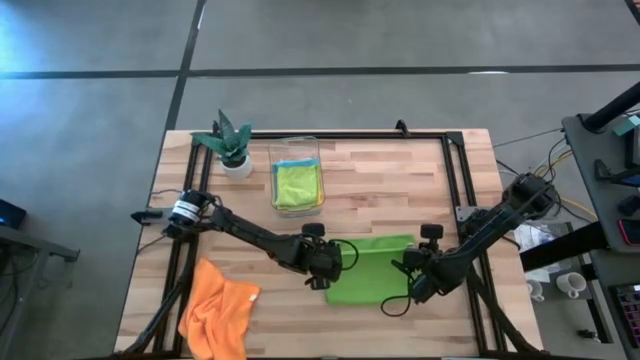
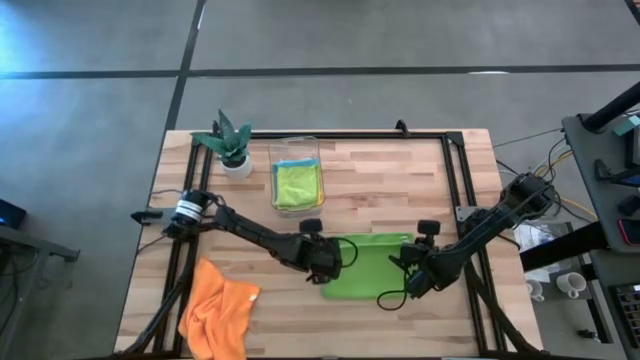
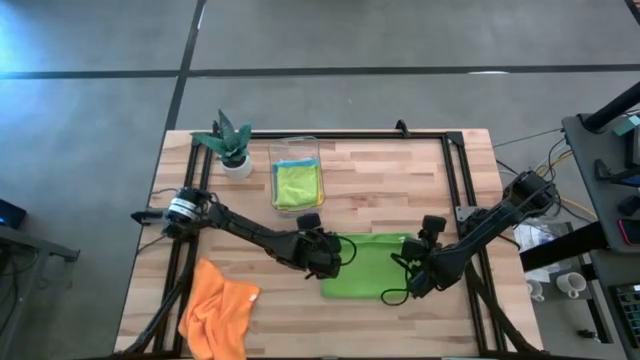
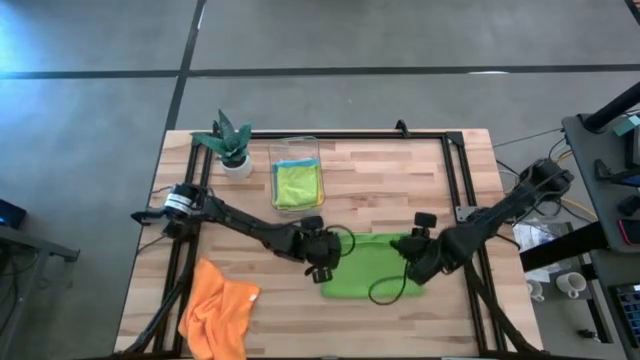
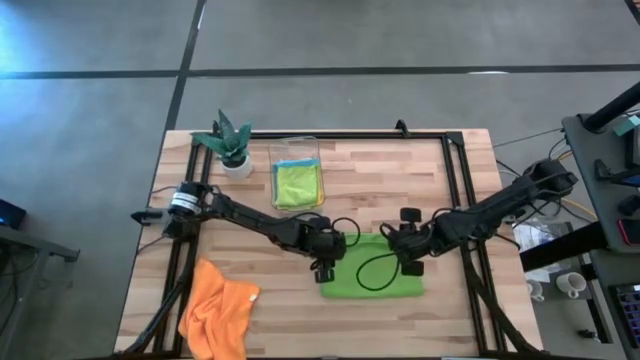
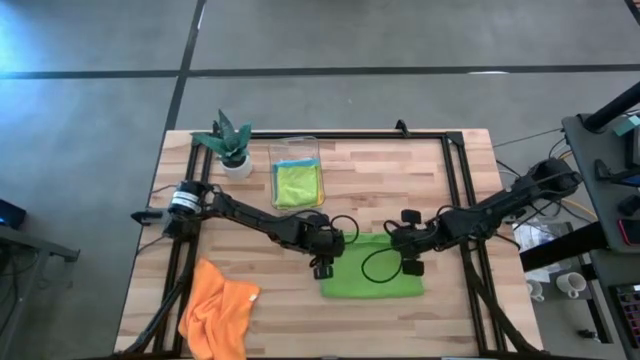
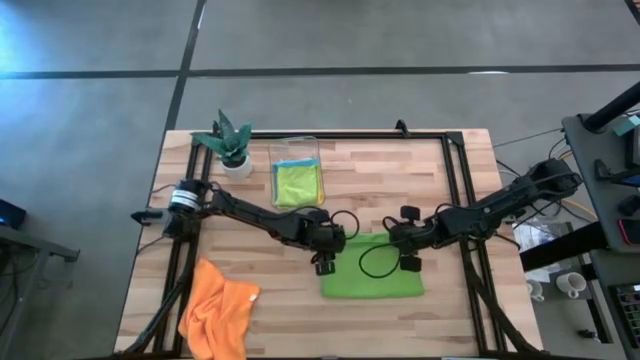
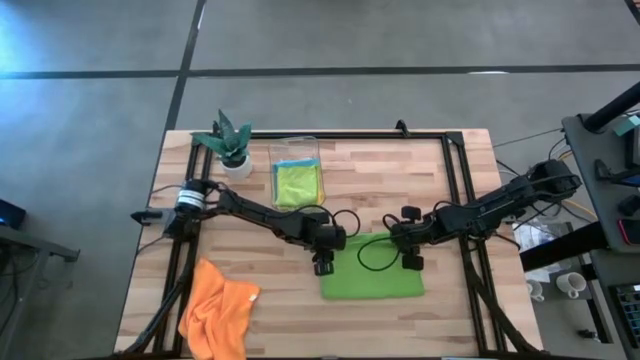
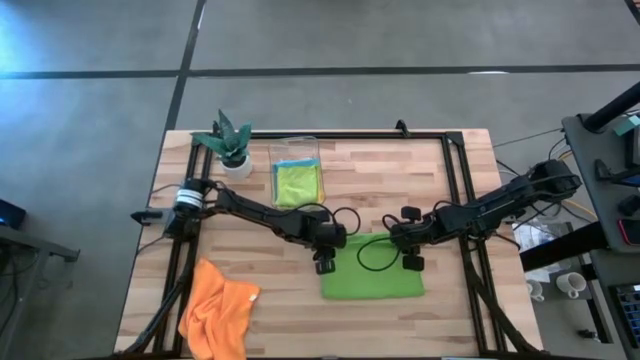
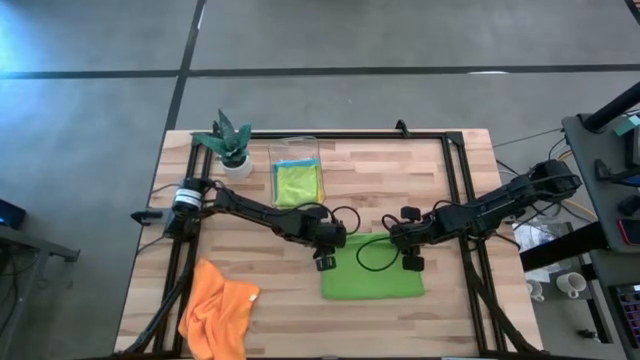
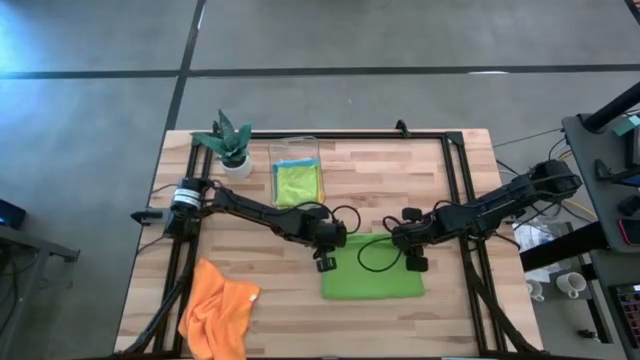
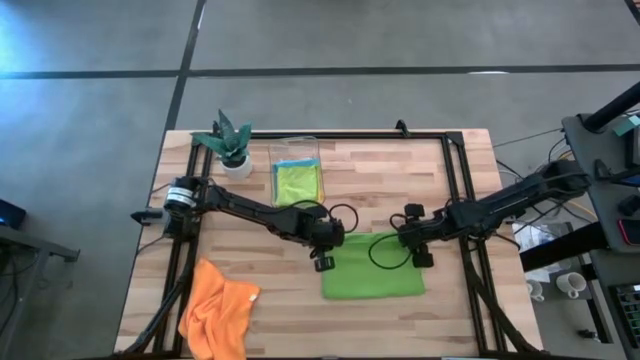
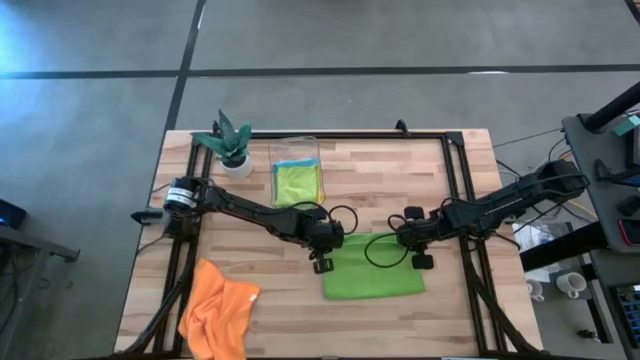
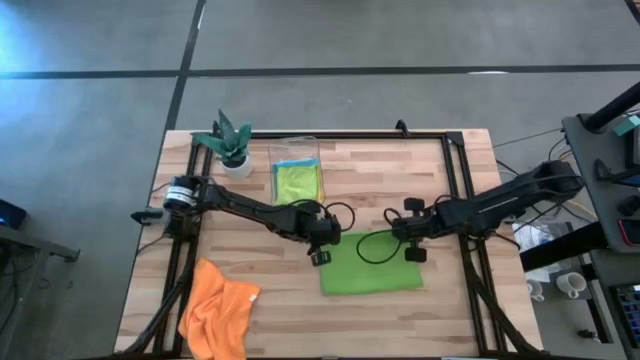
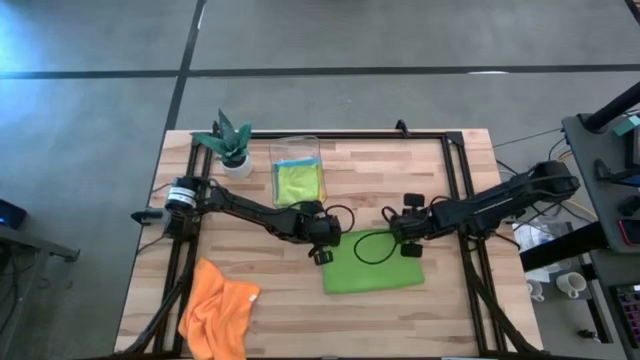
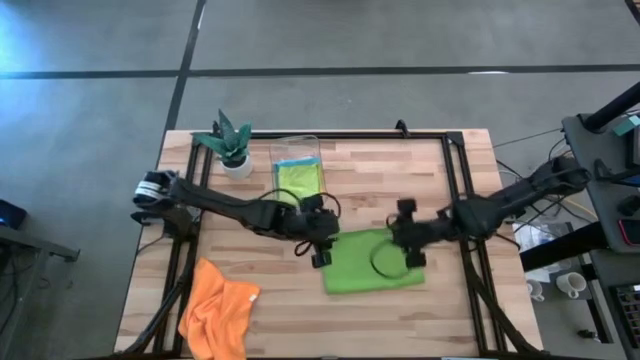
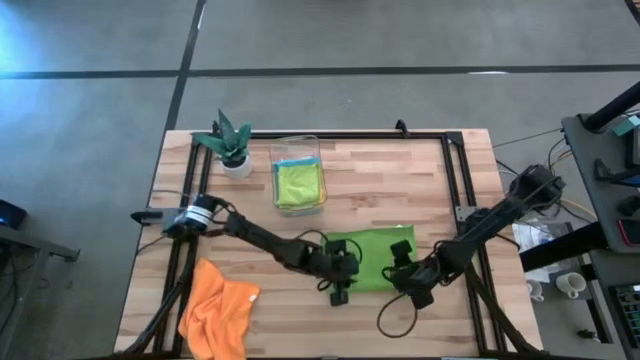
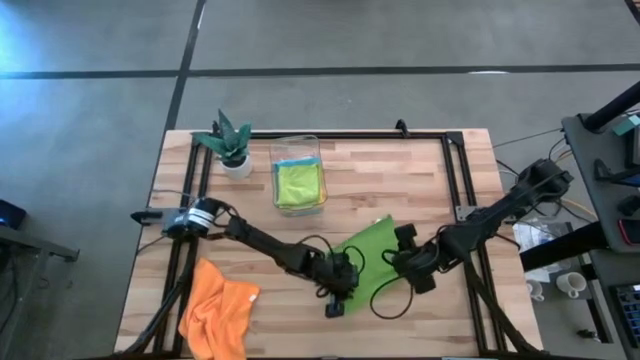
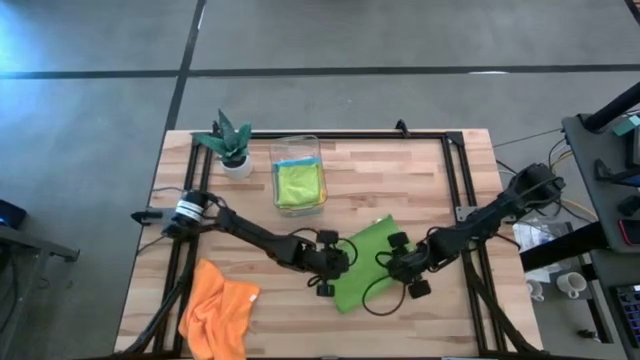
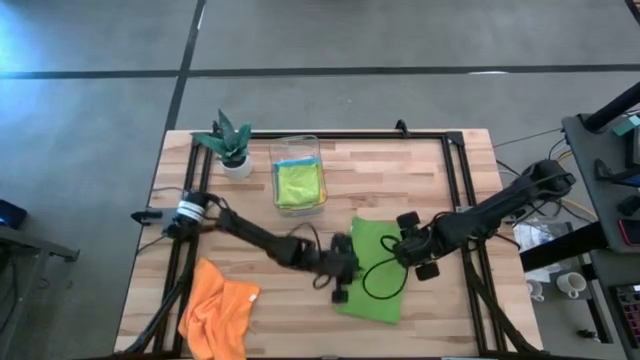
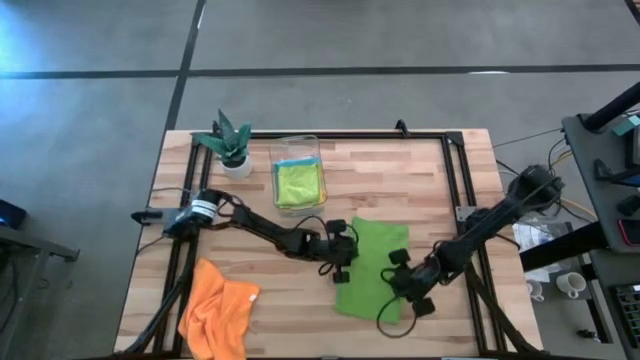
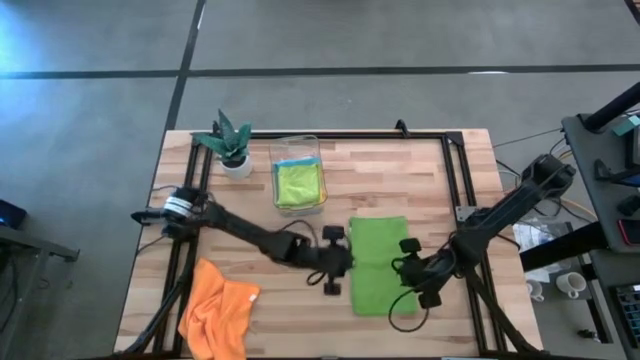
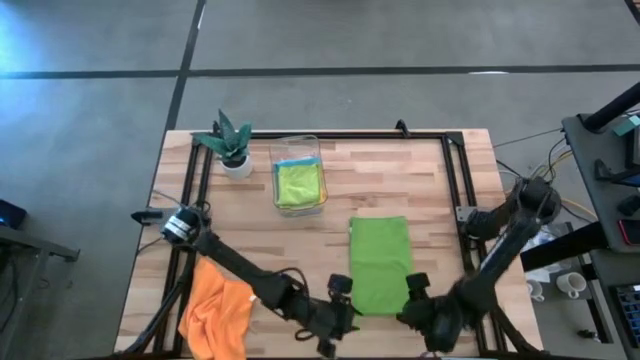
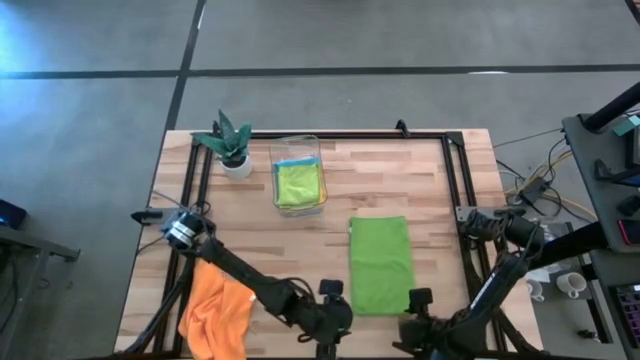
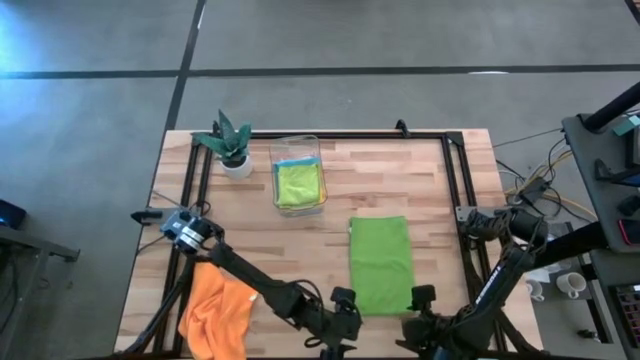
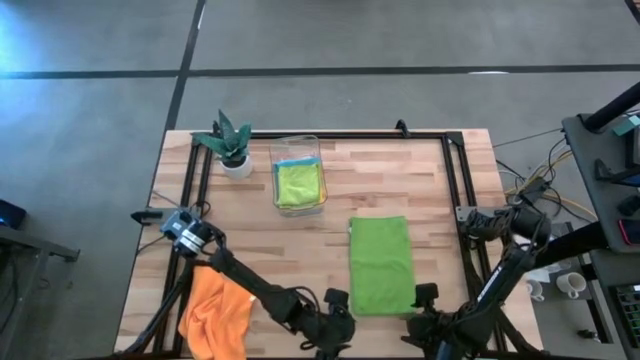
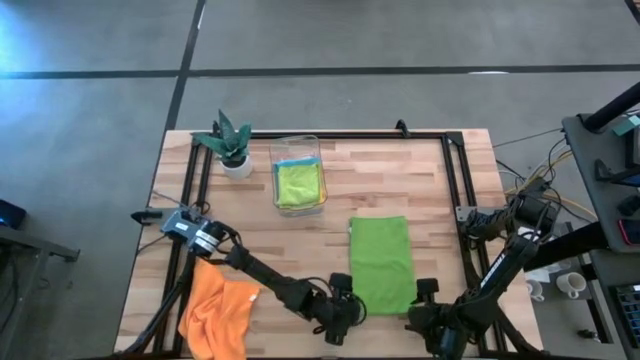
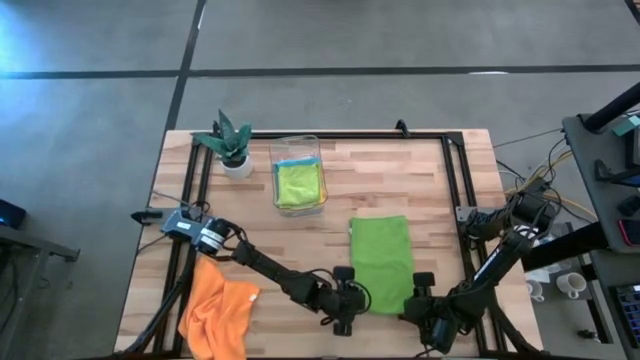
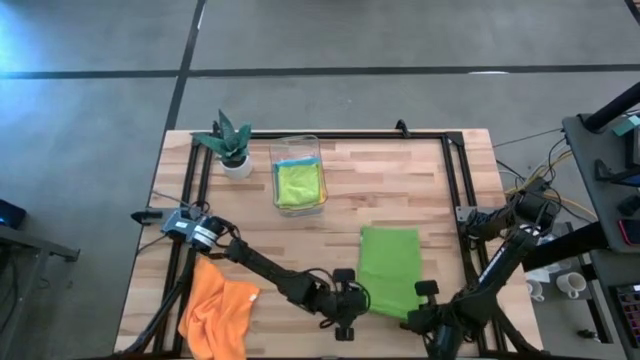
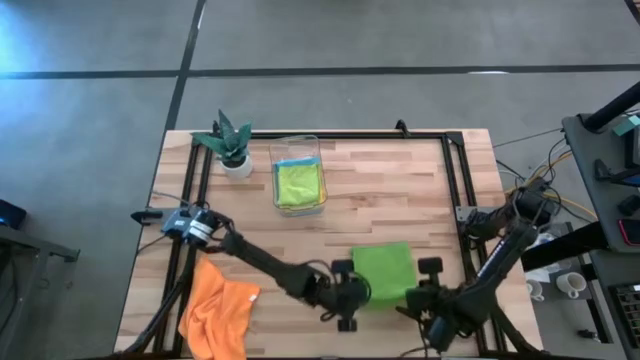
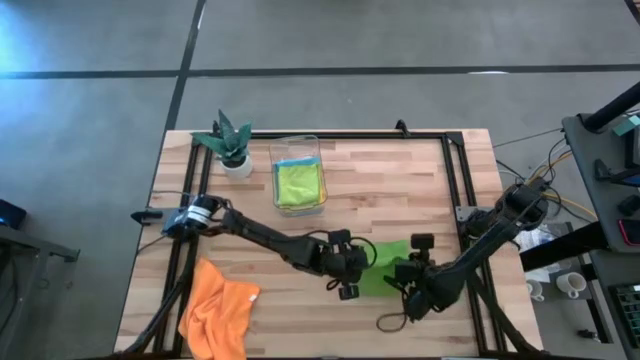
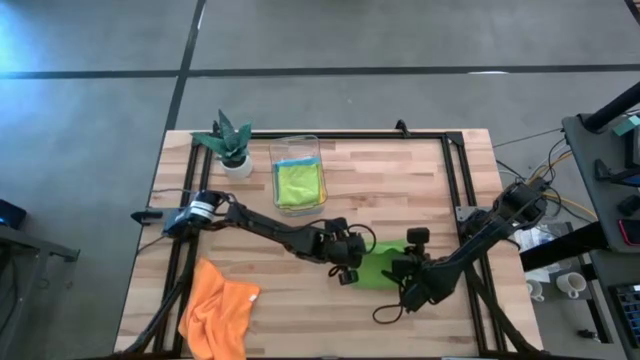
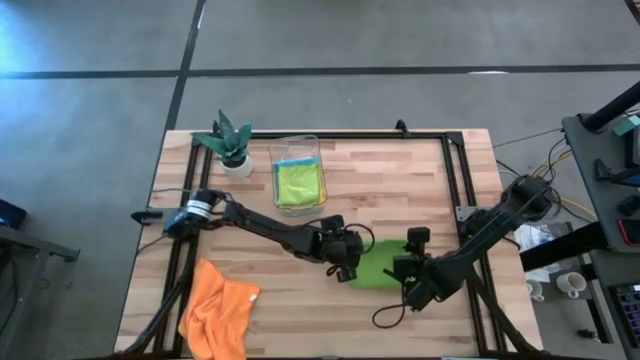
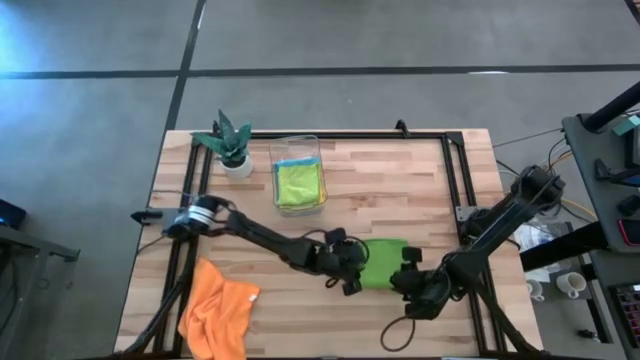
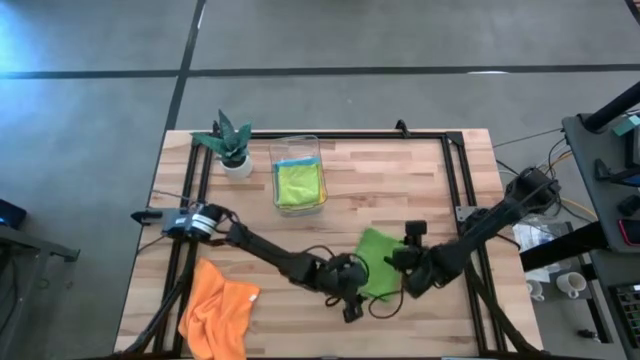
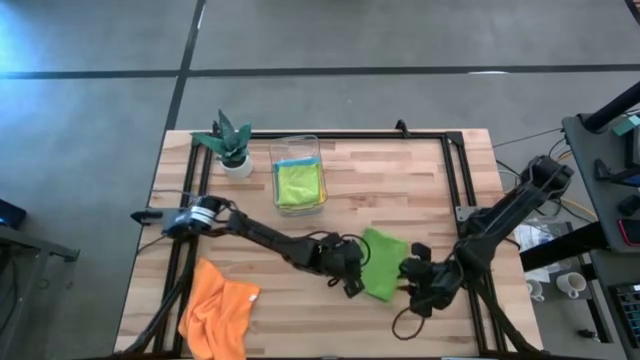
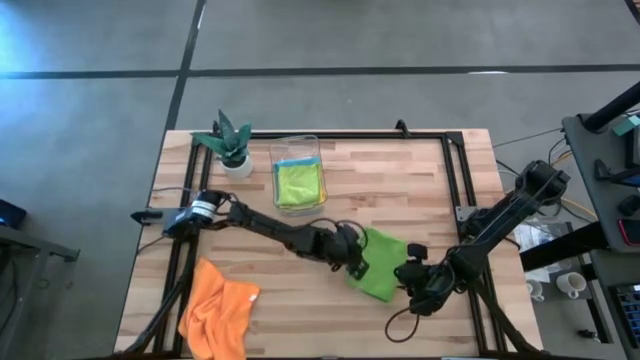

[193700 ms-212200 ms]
Task: Fold microfiber towels
Fold the green microfiber cloth
